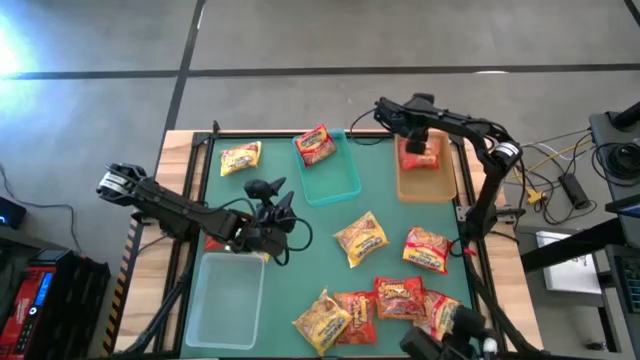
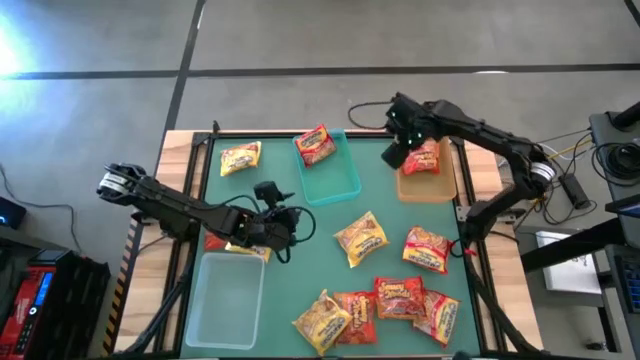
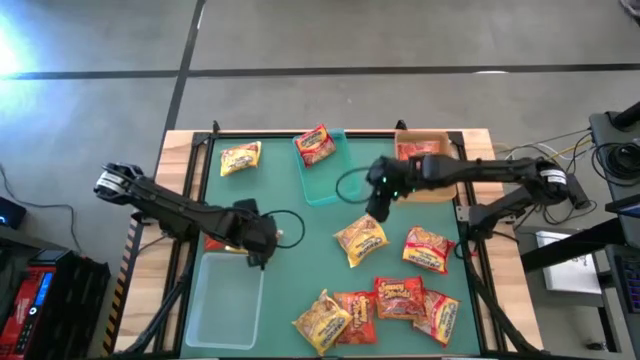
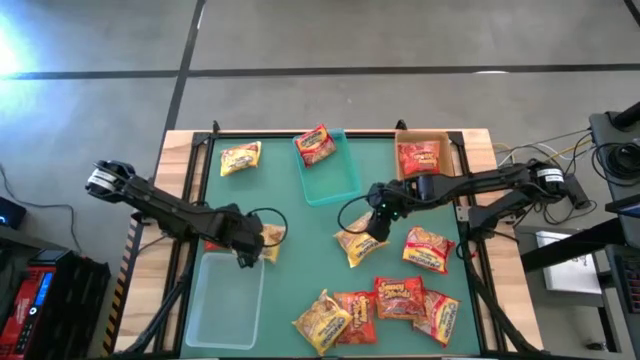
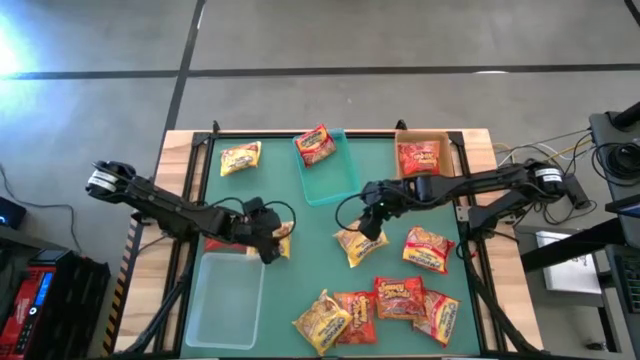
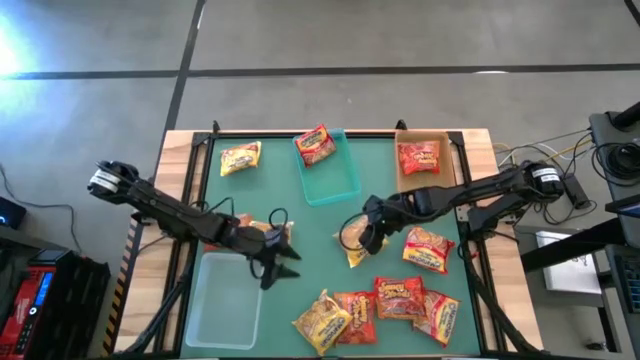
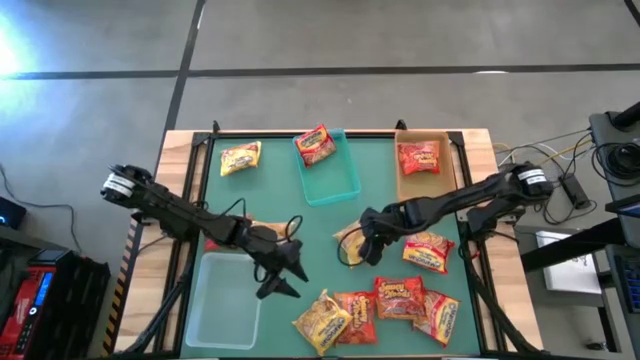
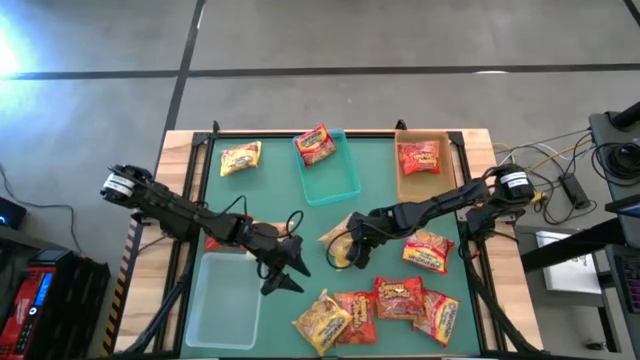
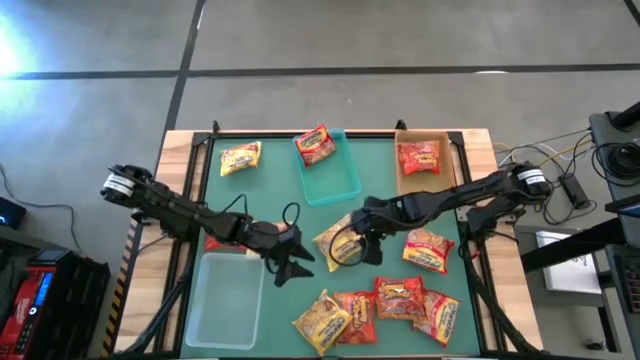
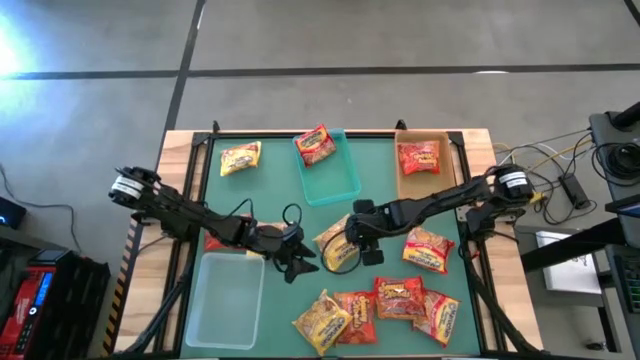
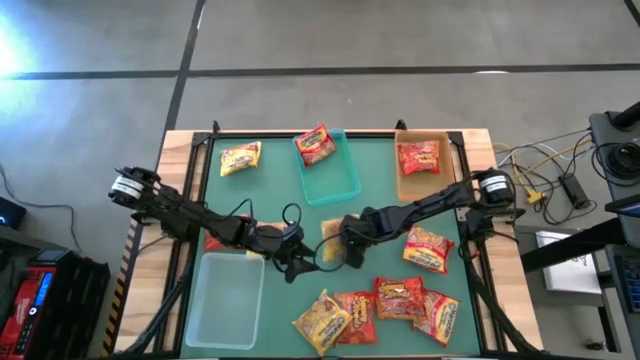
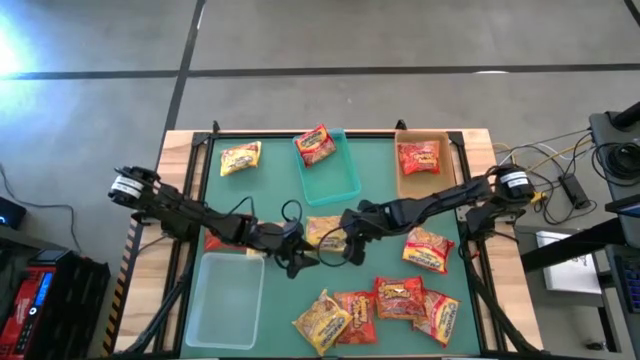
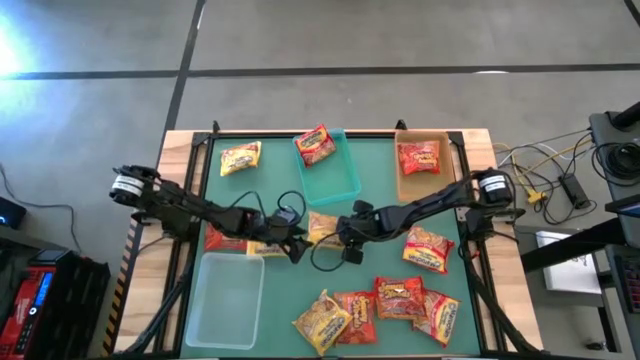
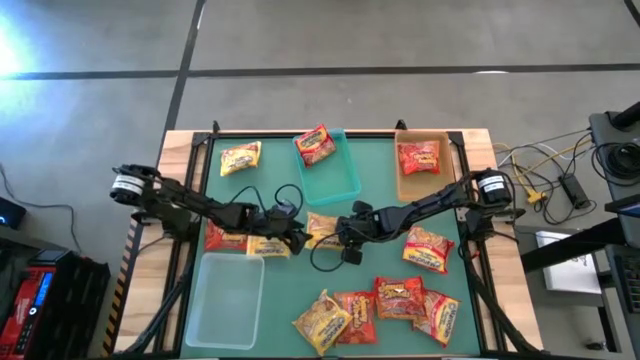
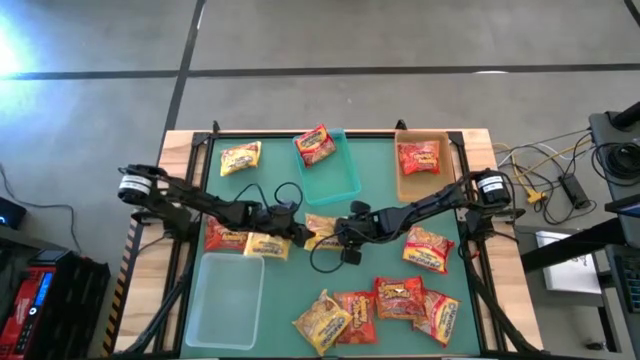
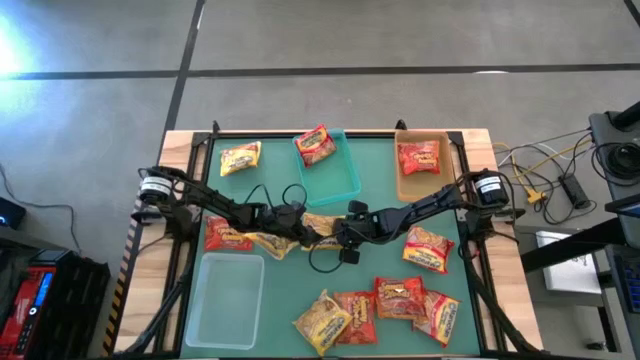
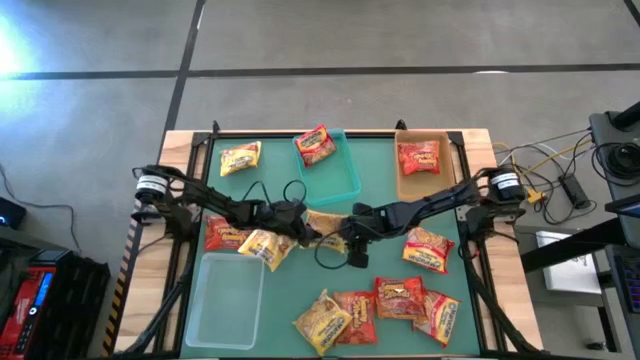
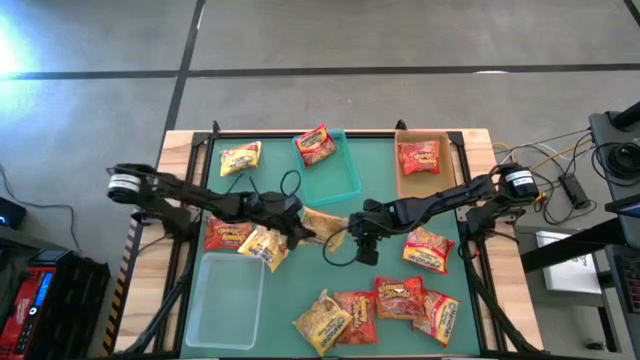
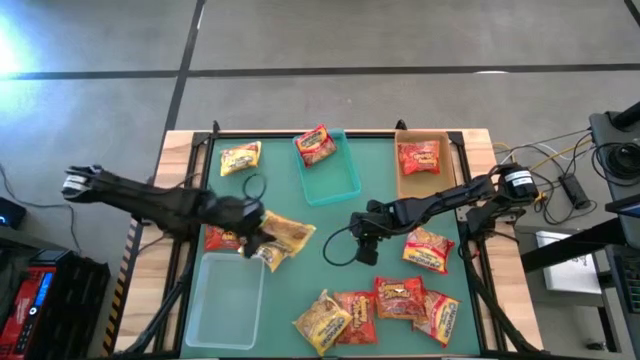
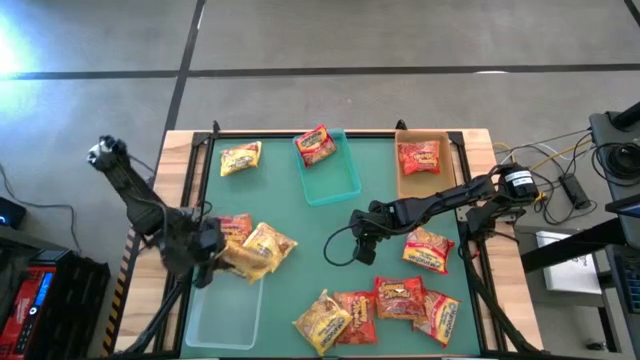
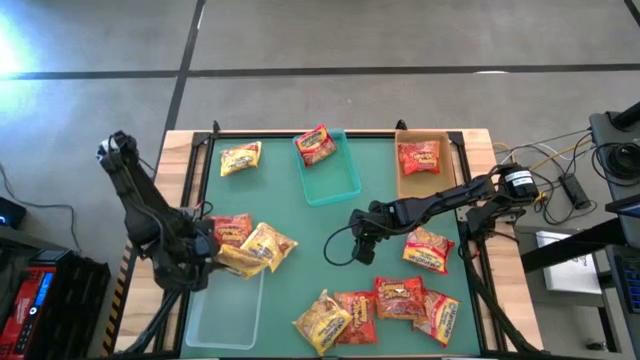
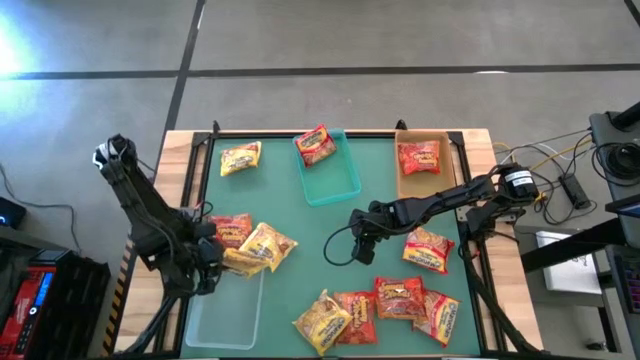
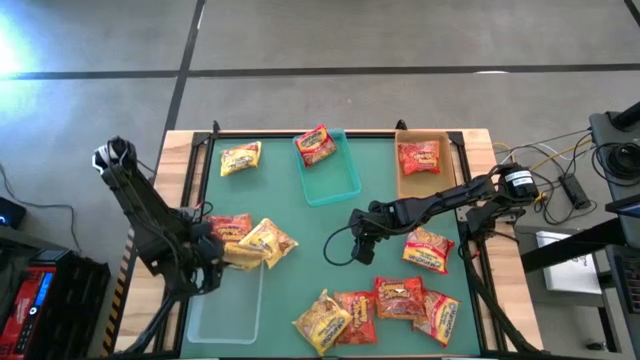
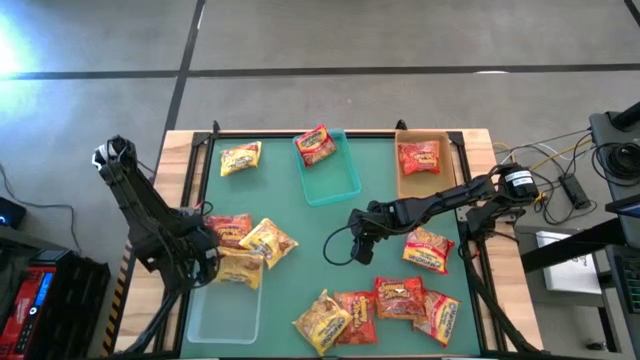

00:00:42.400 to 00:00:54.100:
Task: Sort Maruchan noodles
Put the center yellow noodle pack into the transparent bin

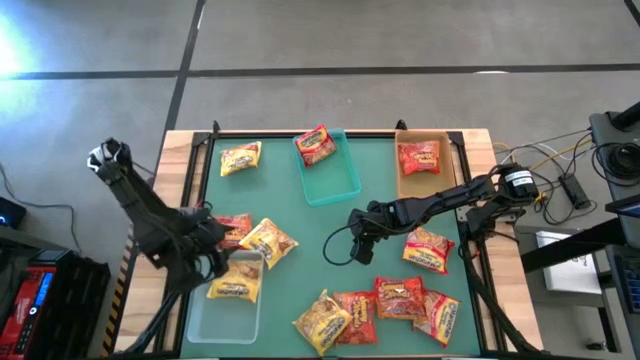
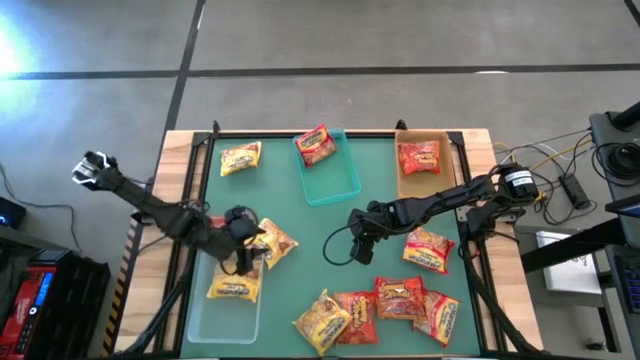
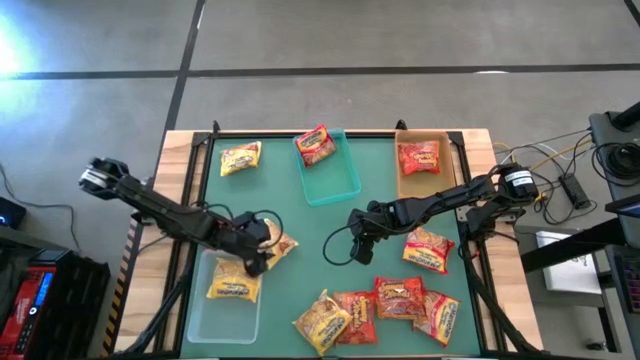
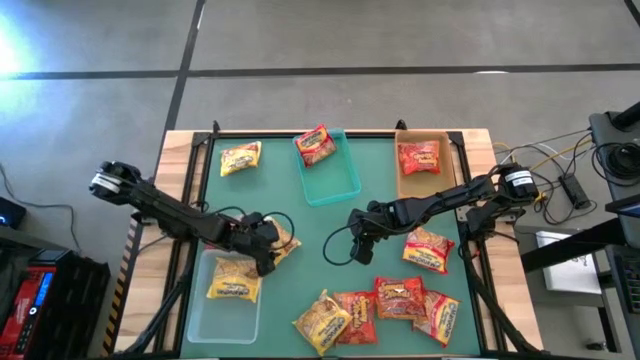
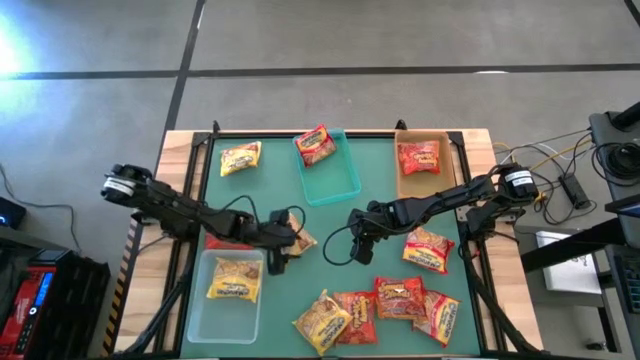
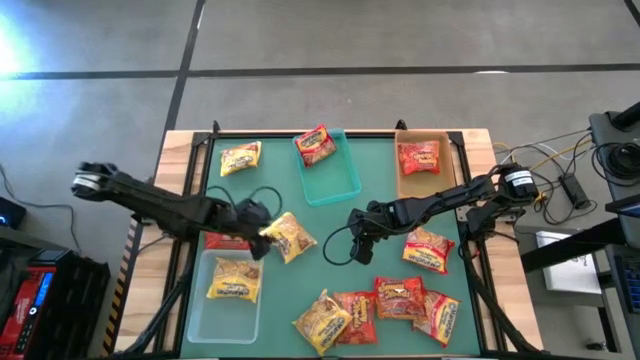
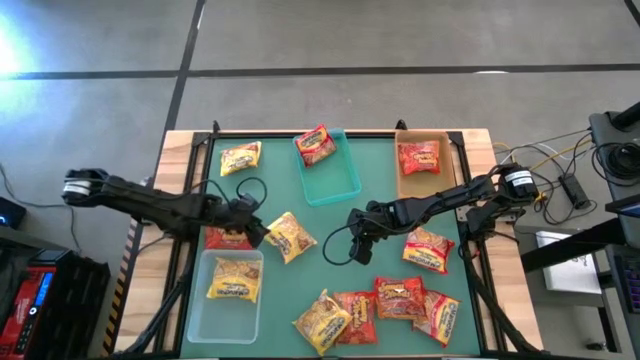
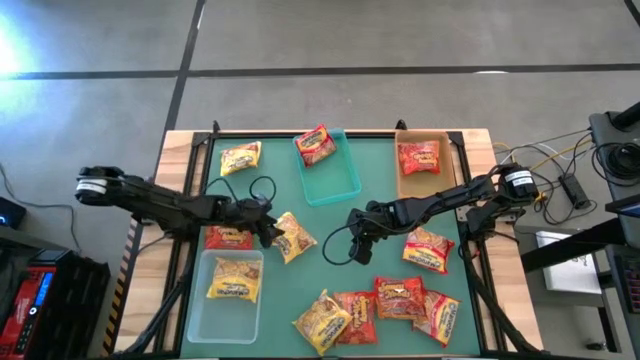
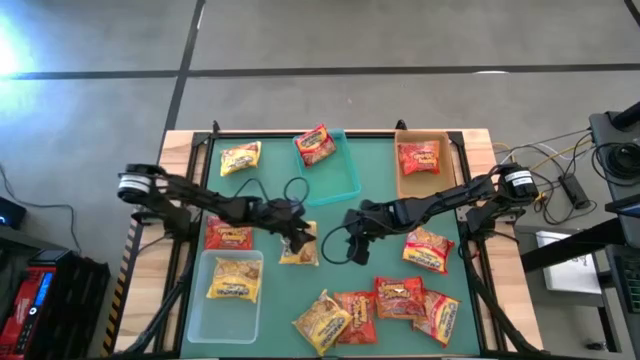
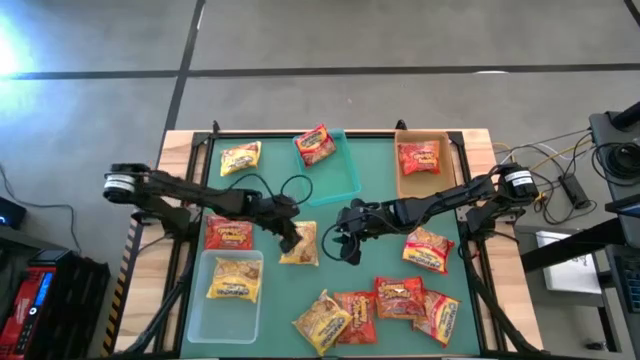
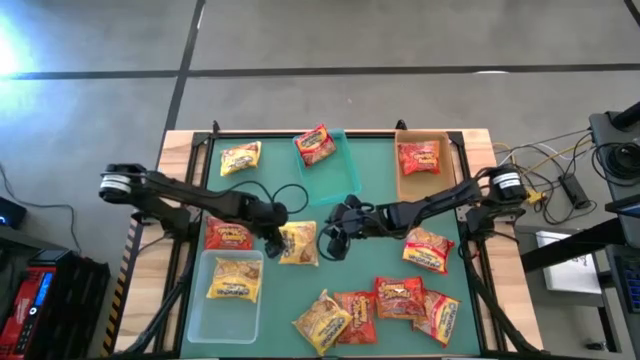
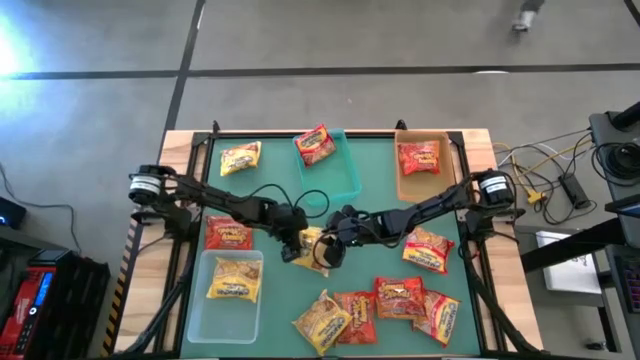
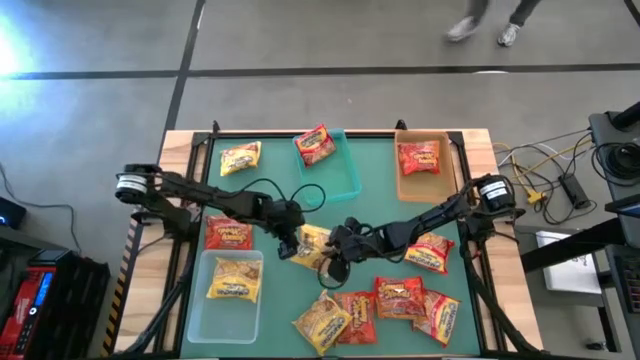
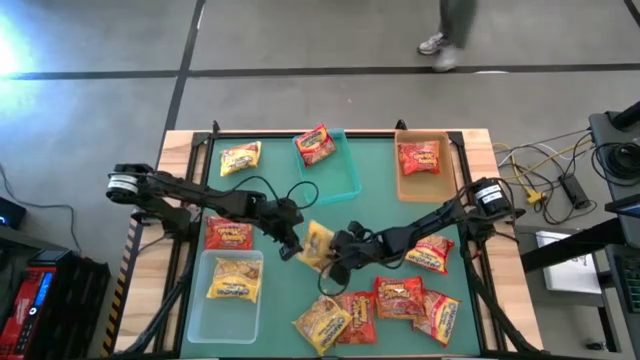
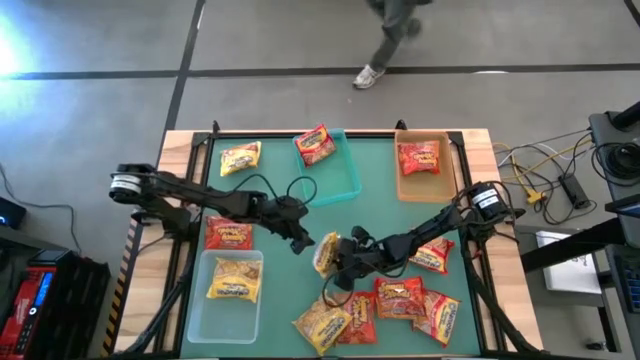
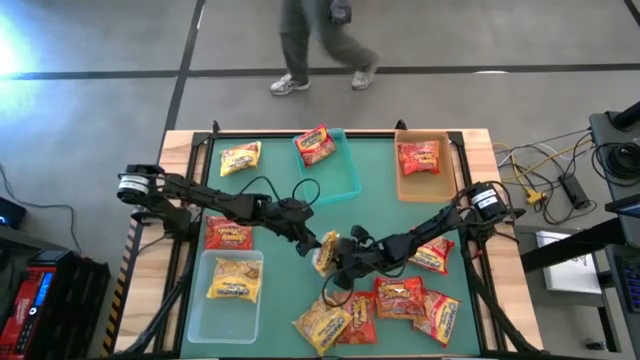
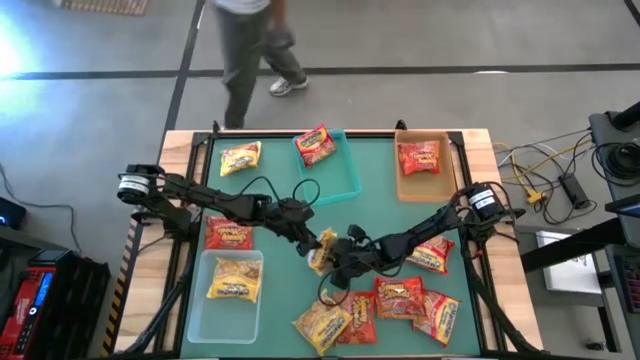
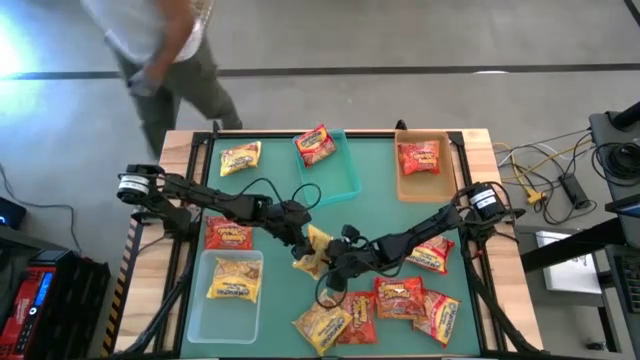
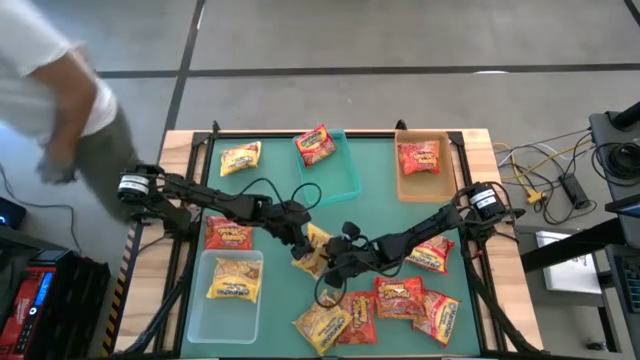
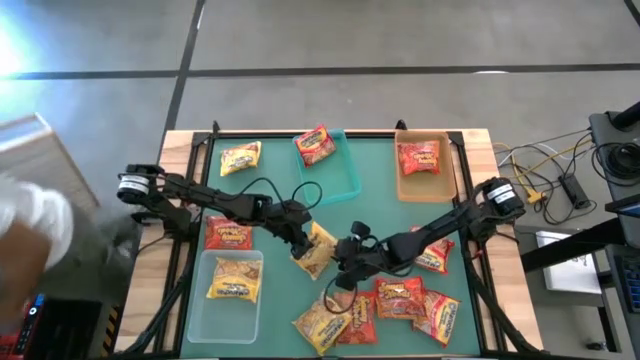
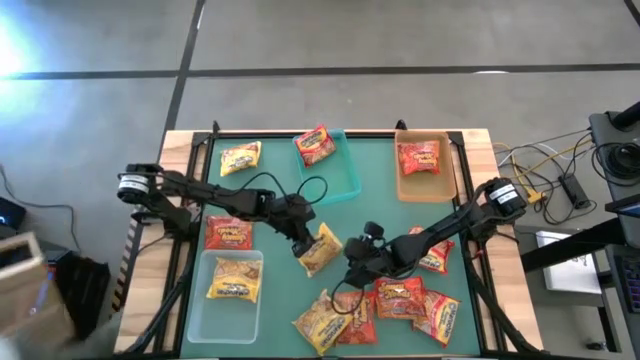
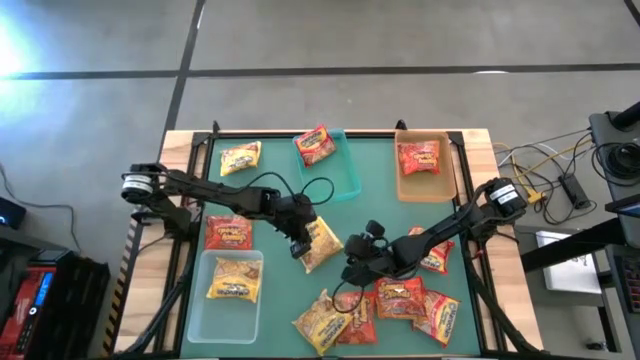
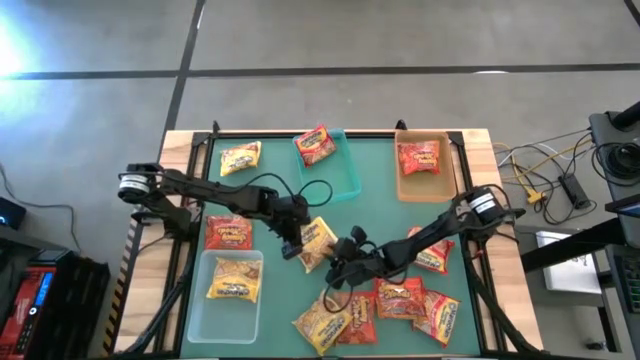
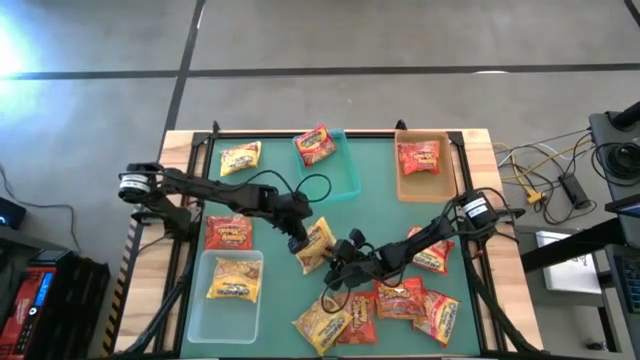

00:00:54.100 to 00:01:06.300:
Put the middle left yellow noodle pack into the transparent bin
